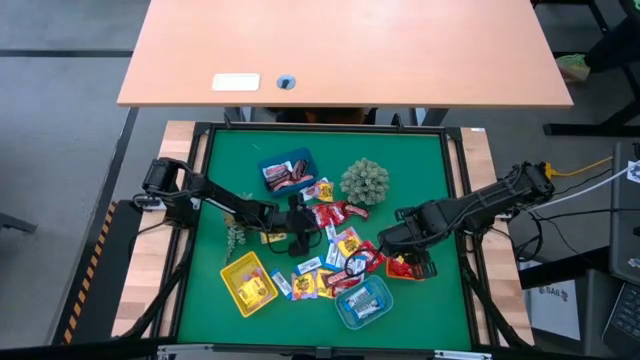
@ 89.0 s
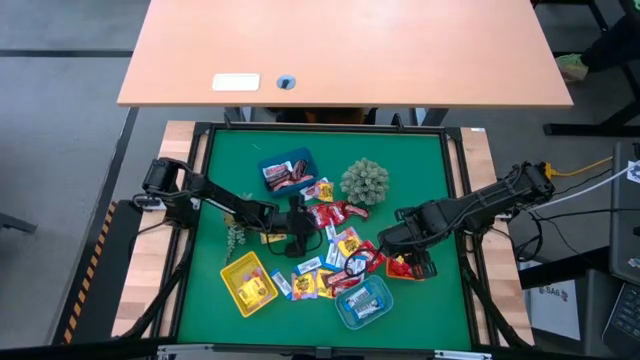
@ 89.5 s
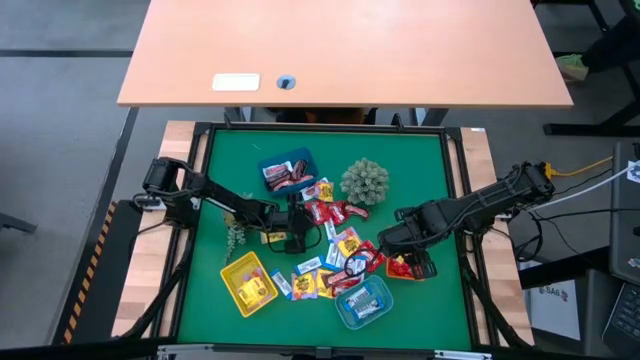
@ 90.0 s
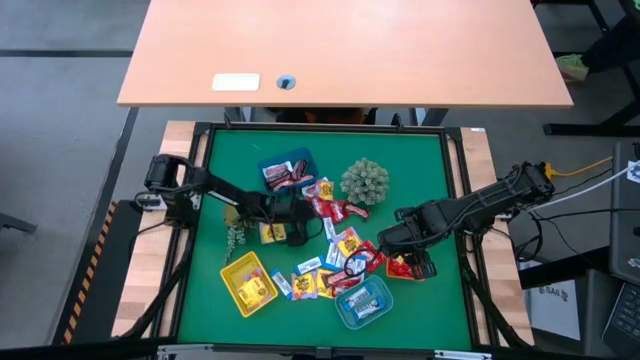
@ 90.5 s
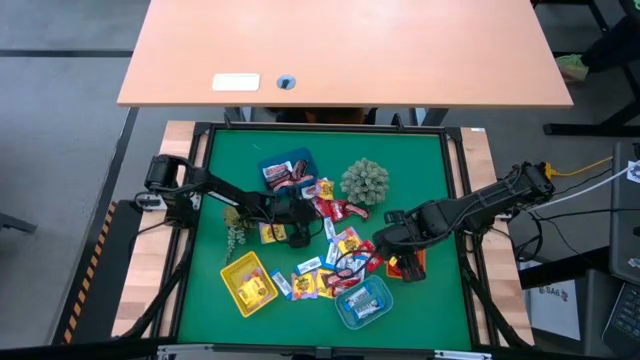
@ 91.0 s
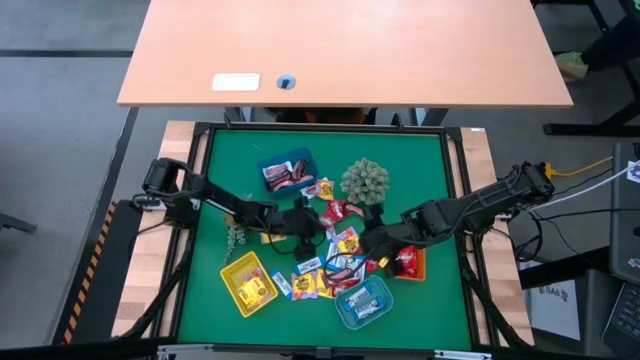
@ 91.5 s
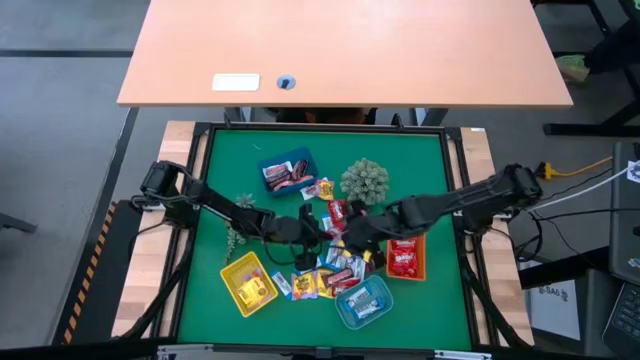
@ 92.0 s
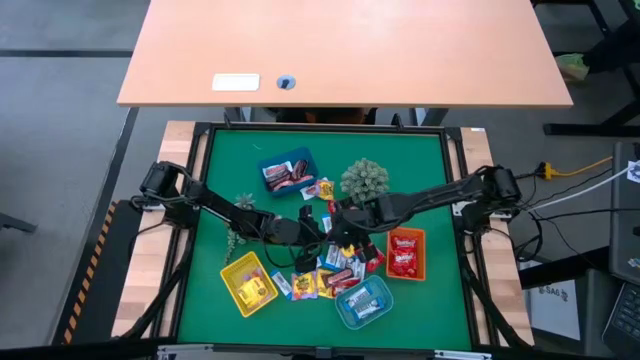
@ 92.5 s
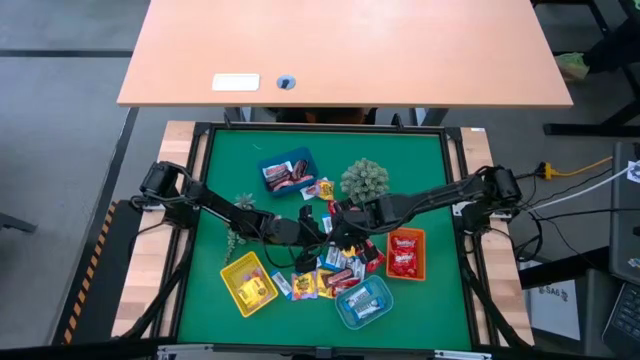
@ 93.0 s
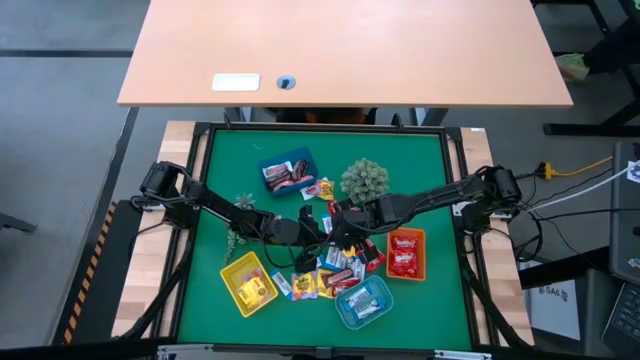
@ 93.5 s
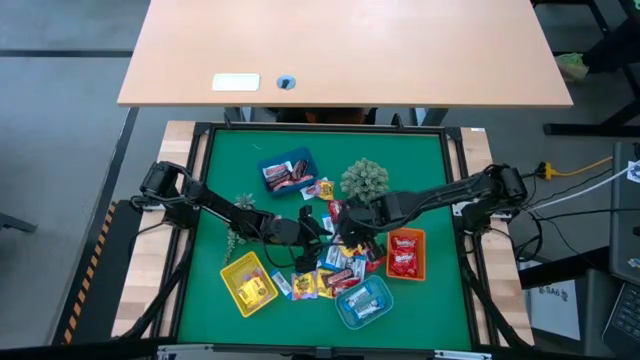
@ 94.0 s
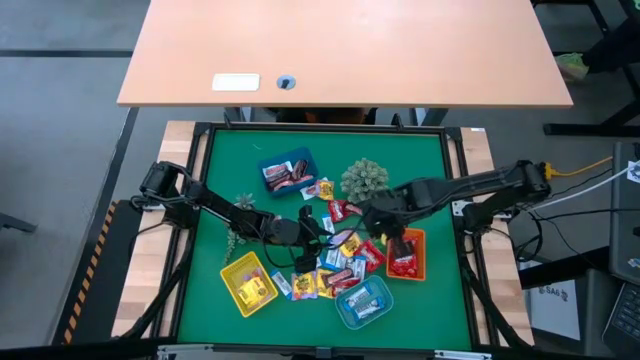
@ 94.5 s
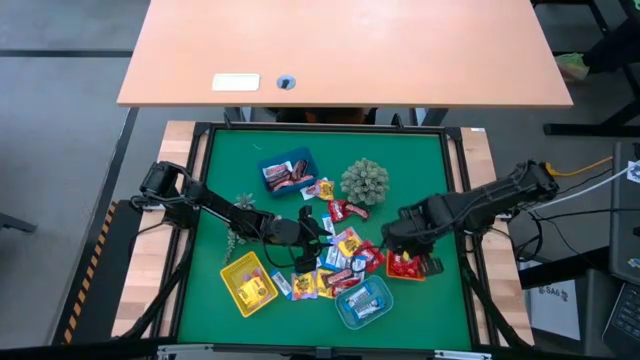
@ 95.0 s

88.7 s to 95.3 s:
Task: Sort candy
Put the red candy into the orange bin

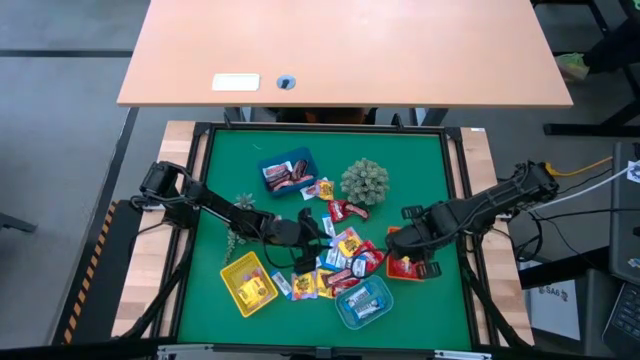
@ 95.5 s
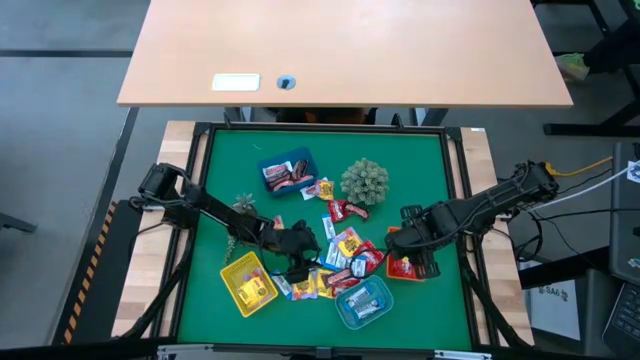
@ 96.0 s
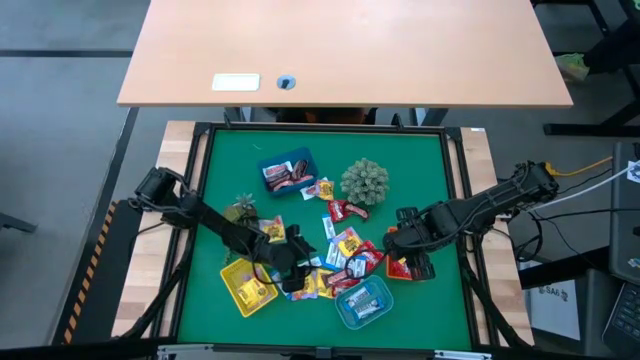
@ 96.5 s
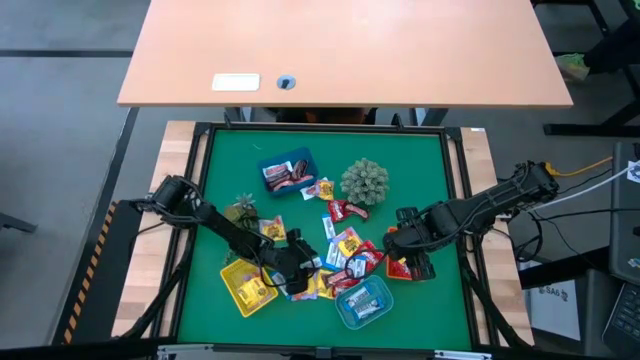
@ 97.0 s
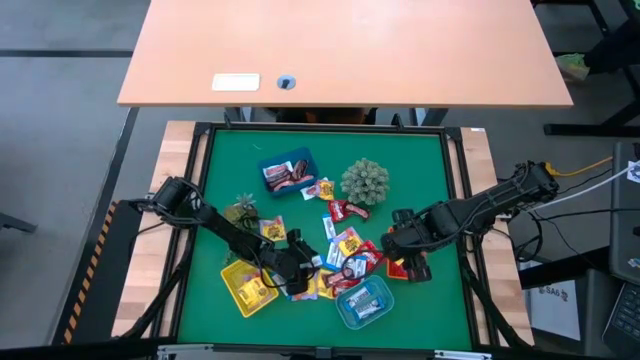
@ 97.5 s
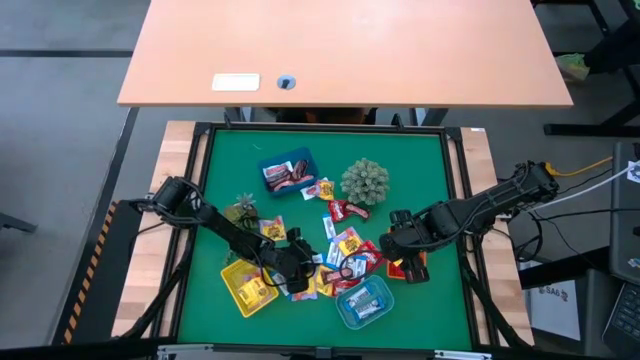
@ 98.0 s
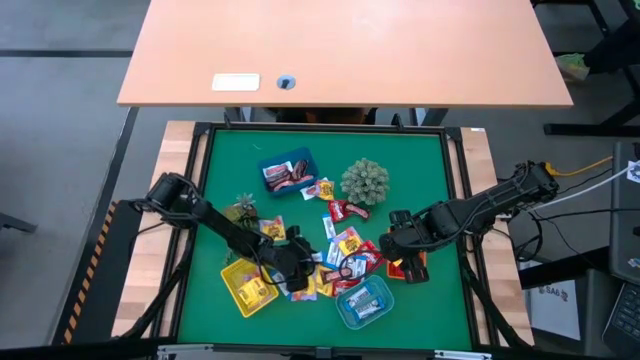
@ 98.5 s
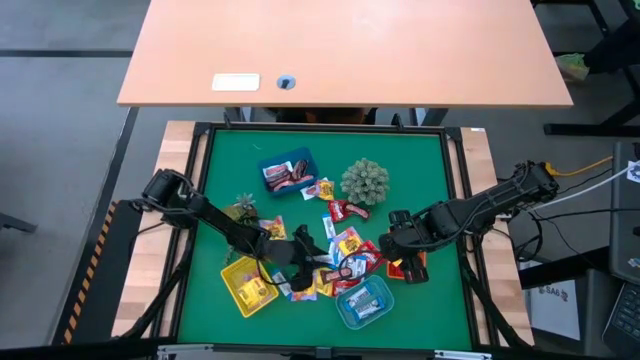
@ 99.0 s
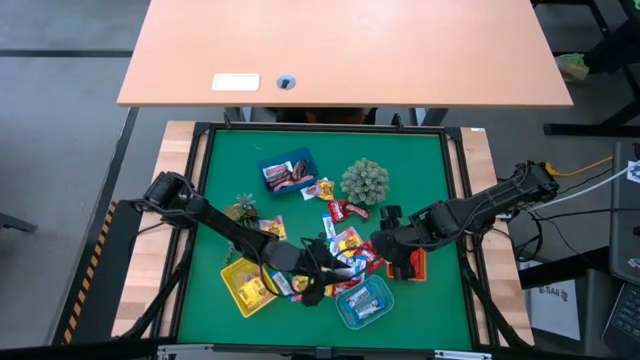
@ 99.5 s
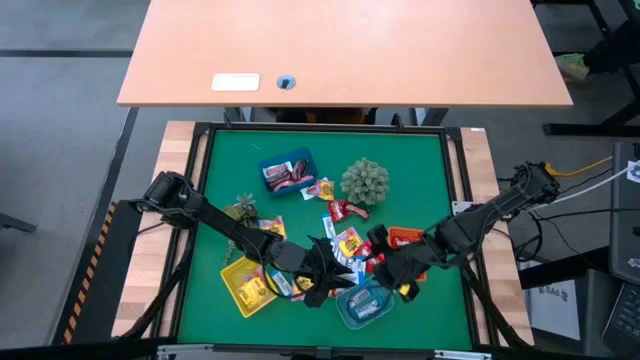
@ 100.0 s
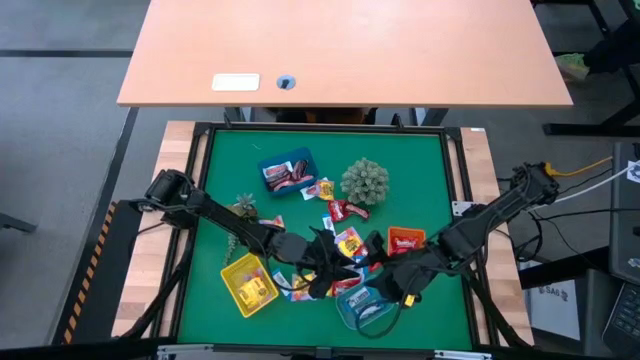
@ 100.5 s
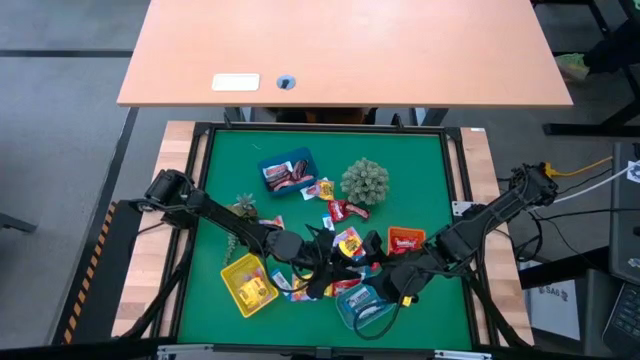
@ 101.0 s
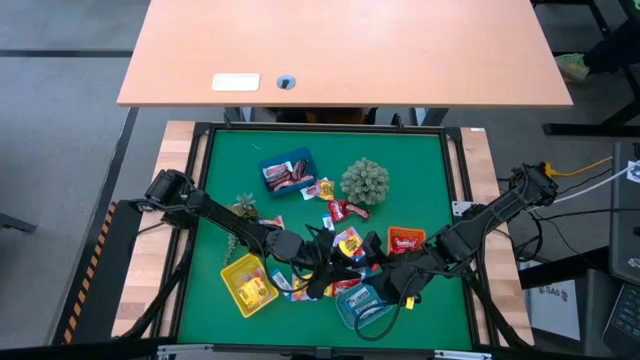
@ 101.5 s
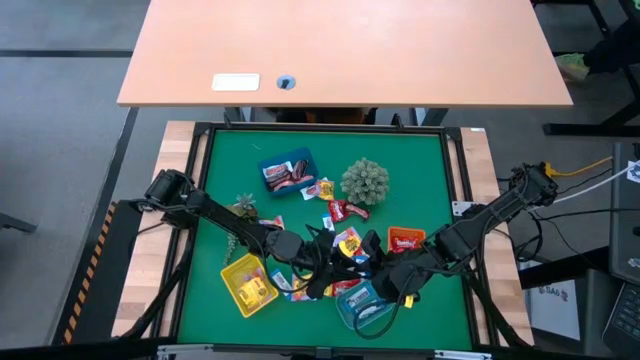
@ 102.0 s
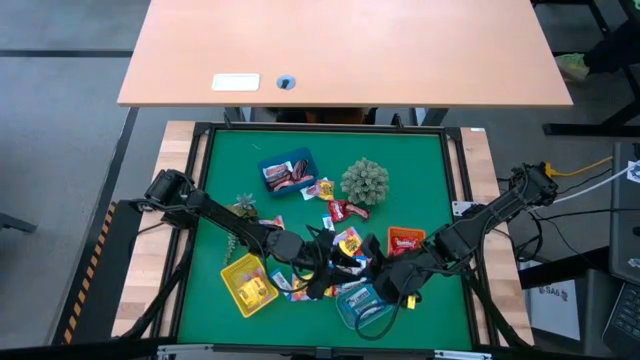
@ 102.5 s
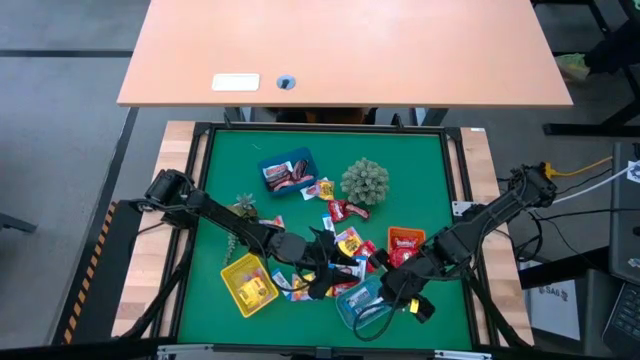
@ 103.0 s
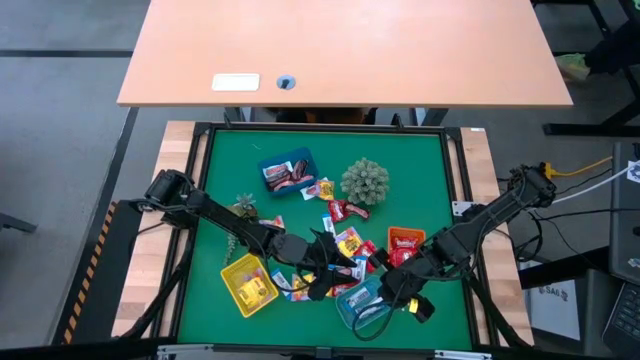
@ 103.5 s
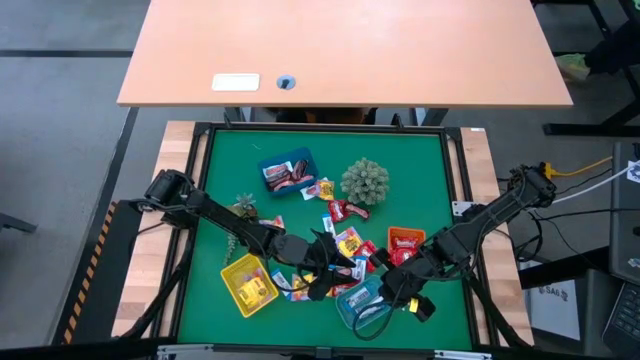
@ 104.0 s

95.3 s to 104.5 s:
Put the white-blue chocolate into the light blue bin

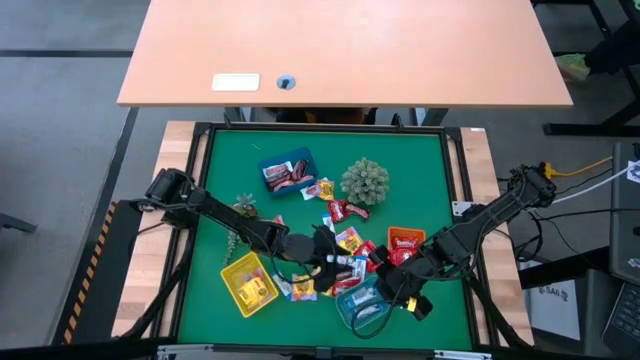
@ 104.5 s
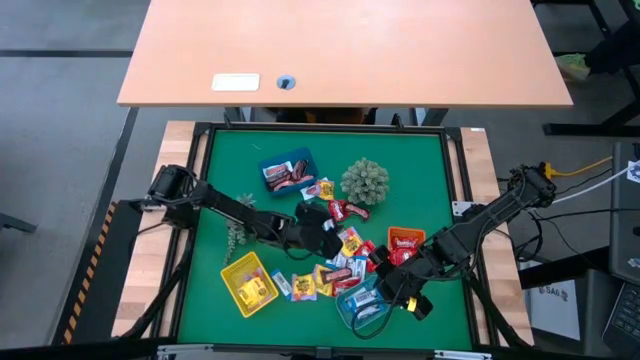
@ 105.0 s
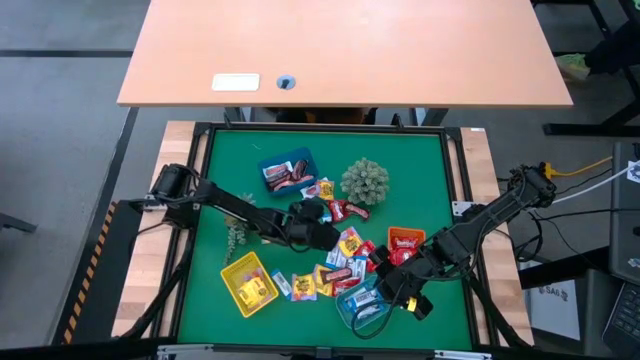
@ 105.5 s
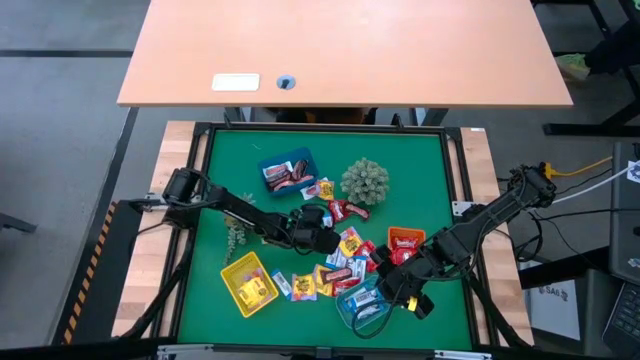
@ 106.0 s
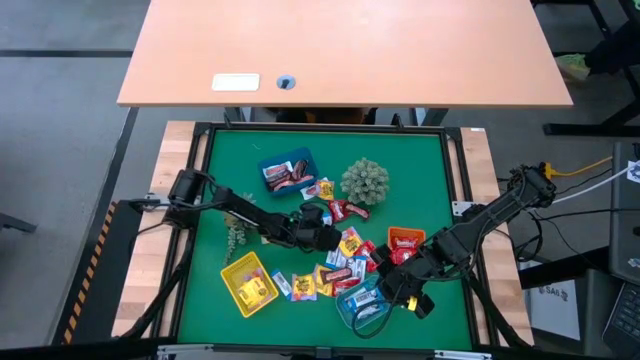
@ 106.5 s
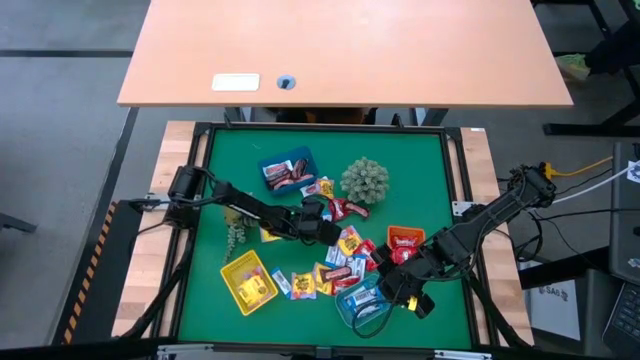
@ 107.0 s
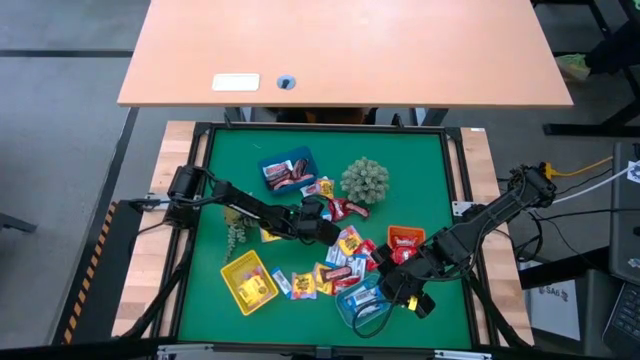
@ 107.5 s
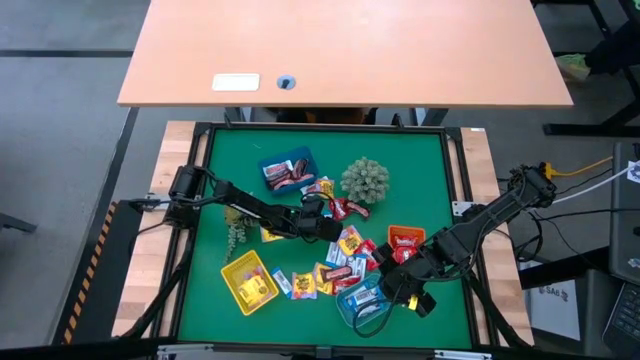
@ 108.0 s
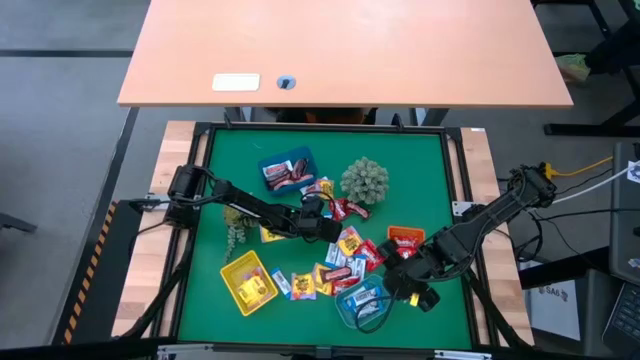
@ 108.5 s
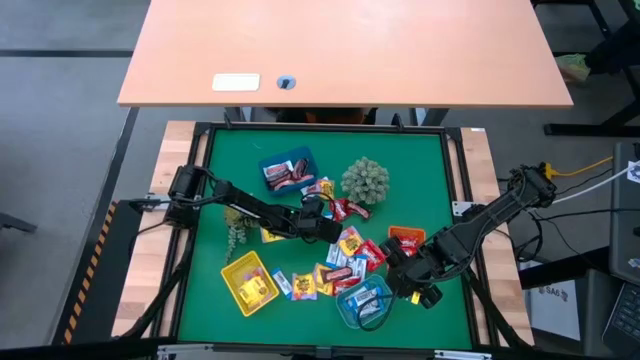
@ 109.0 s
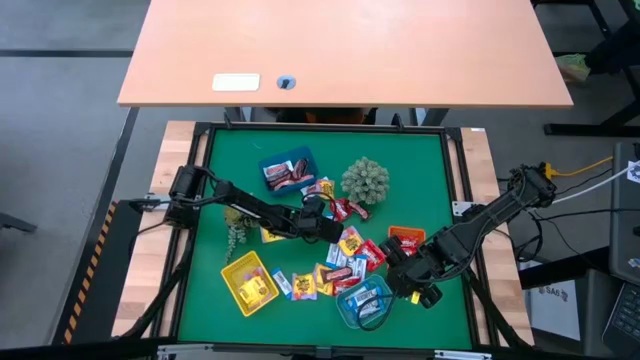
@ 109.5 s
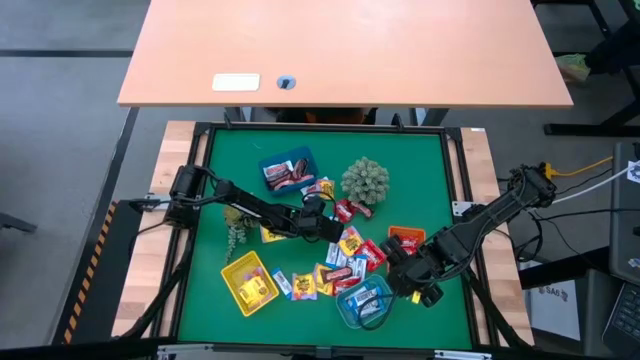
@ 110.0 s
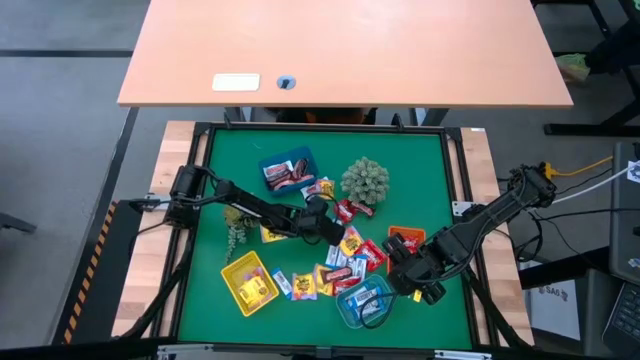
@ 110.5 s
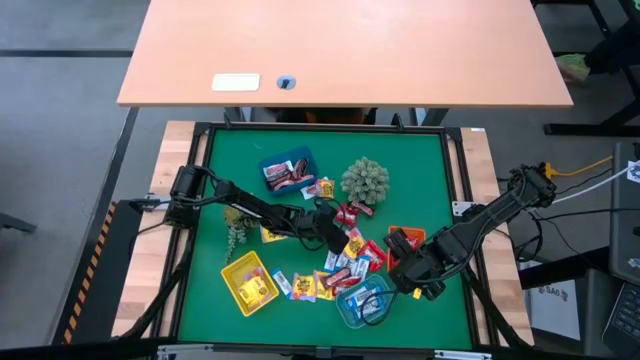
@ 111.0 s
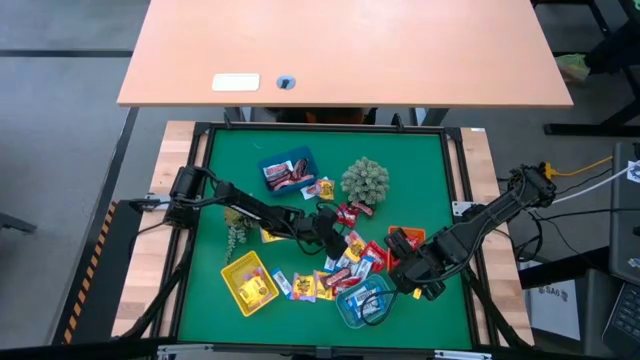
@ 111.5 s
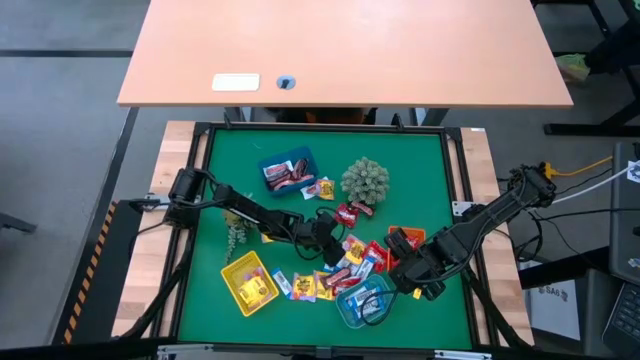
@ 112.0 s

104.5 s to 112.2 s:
Put the white-blue chocolate into the light blue bin
